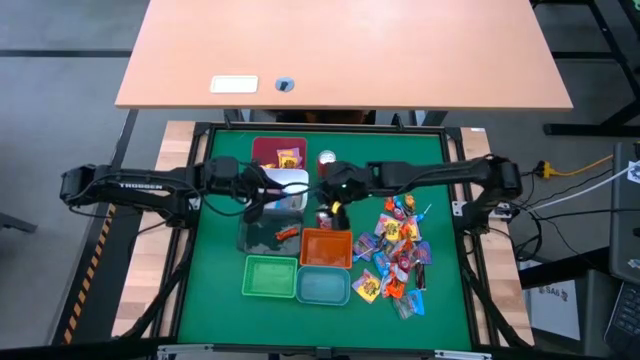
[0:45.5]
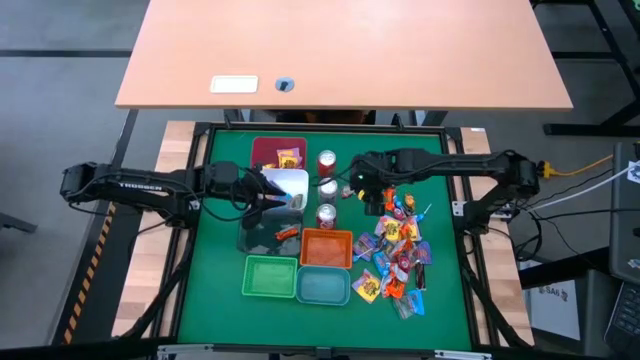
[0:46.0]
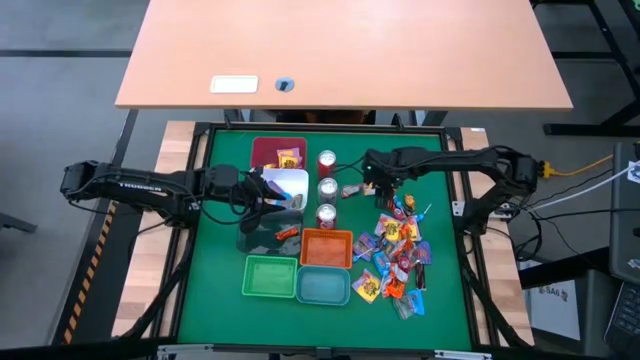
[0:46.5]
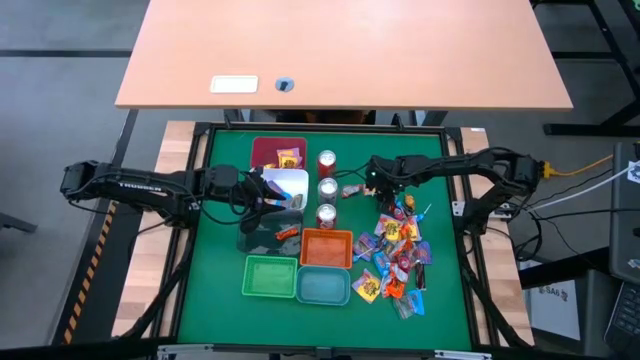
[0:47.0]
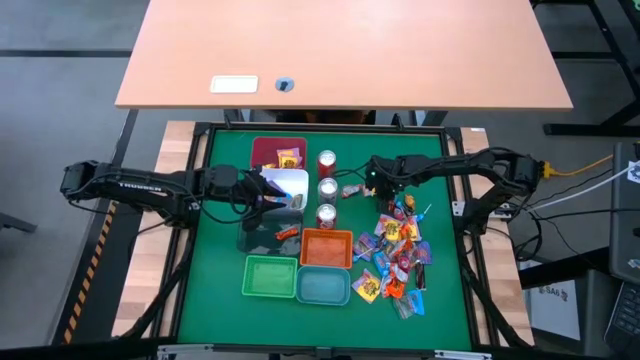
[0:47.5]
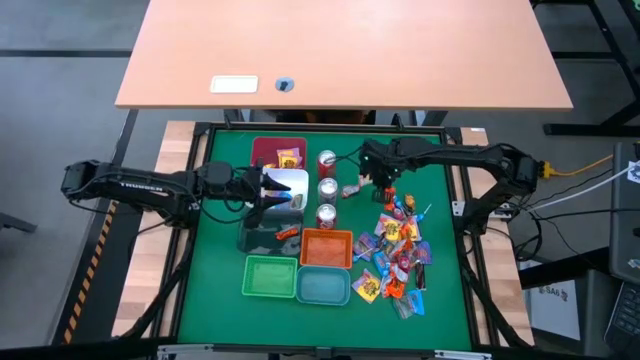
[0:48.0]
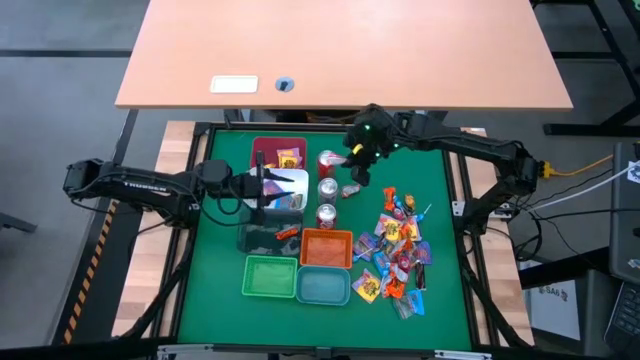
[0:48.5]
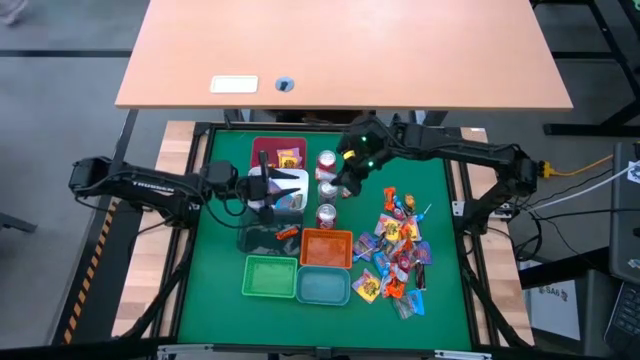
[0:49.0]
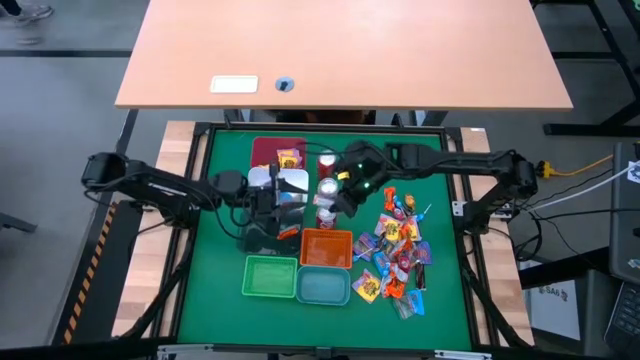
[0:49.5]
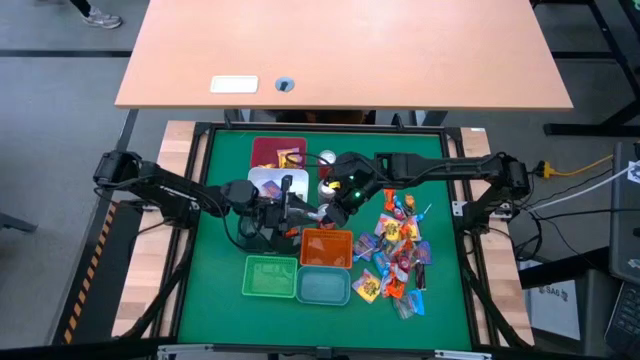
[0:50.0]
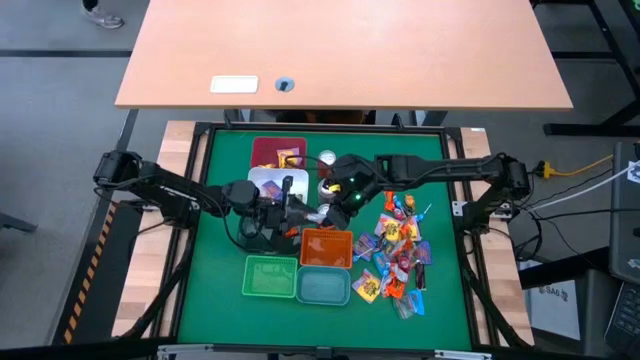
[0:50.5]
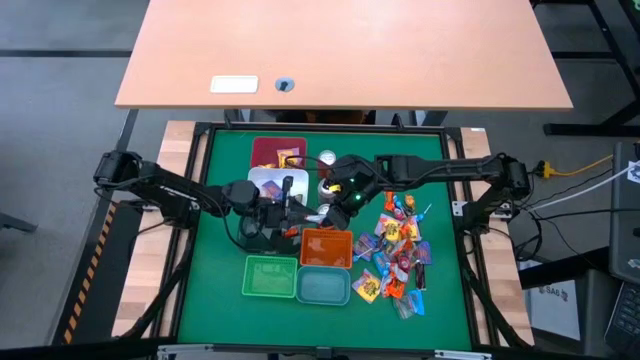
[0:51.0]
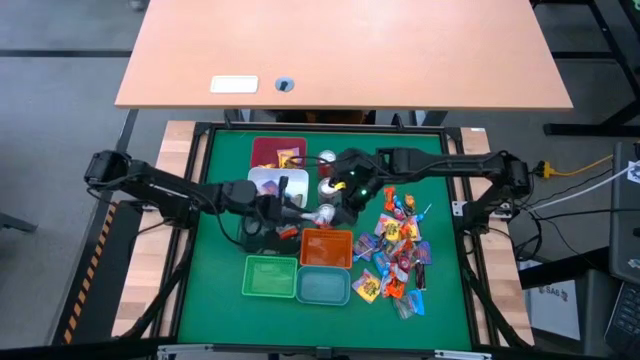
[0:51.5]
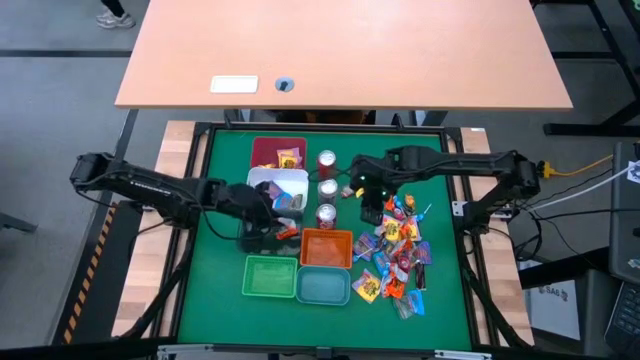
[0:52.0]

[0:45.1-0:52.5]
Task: Sort candy
Put the orange chocolate into the black bin

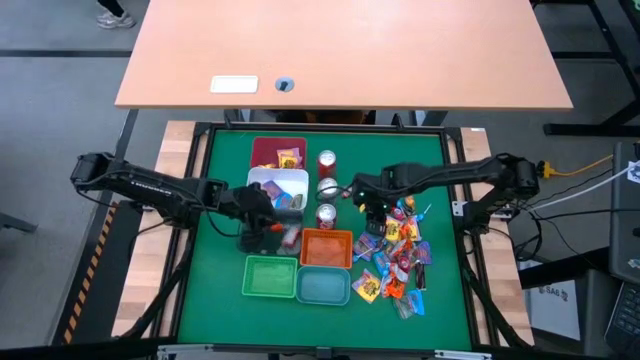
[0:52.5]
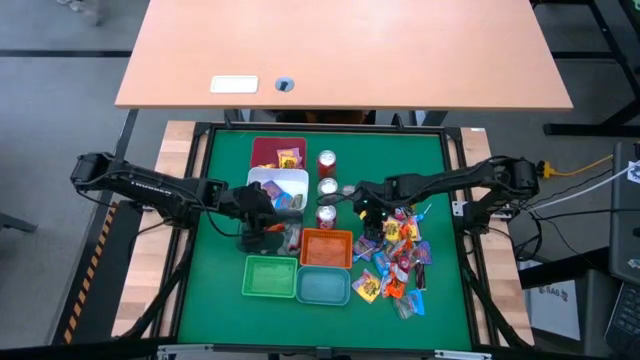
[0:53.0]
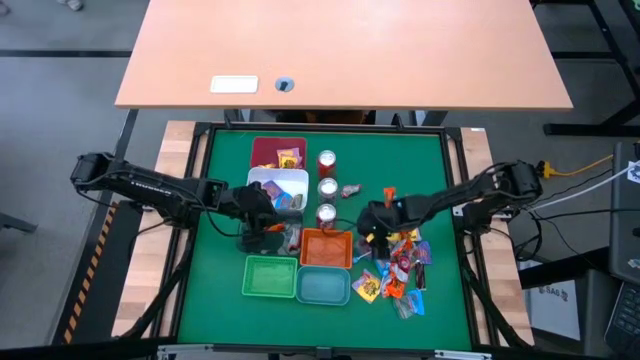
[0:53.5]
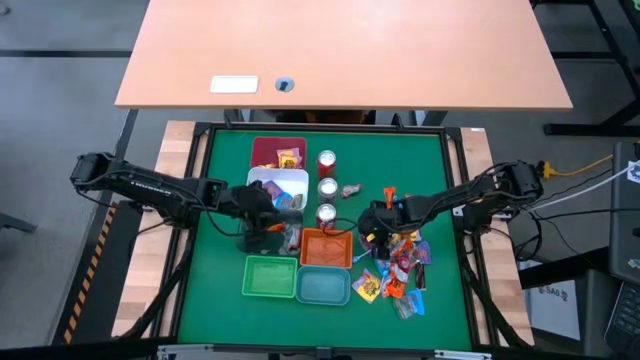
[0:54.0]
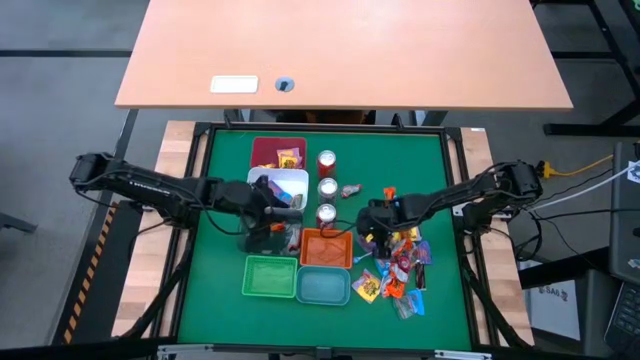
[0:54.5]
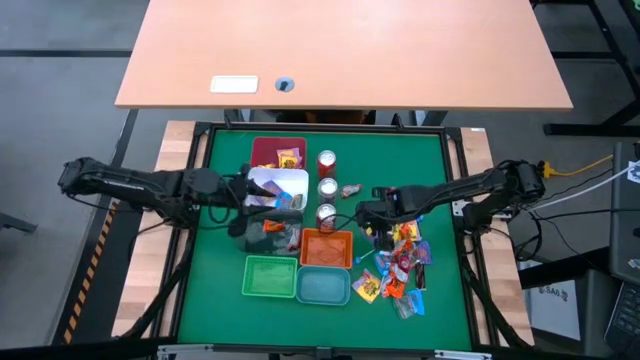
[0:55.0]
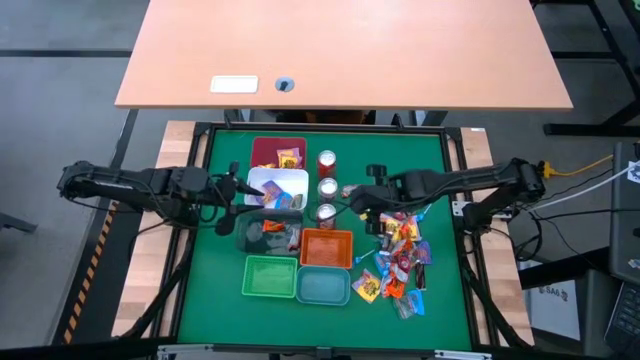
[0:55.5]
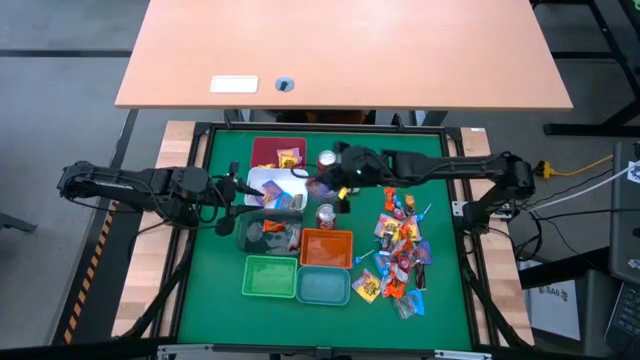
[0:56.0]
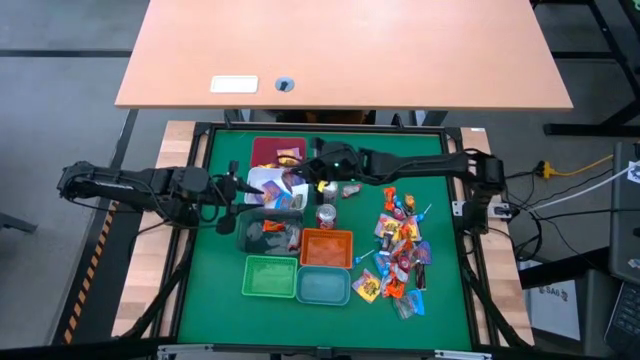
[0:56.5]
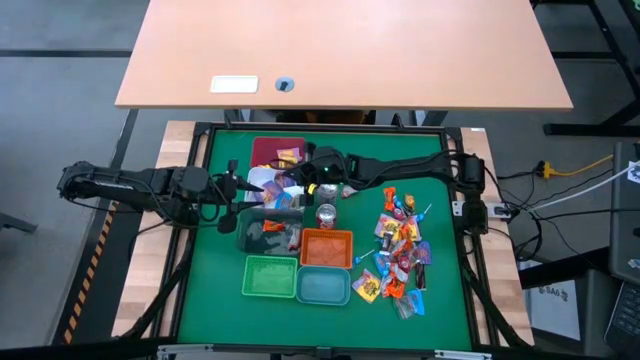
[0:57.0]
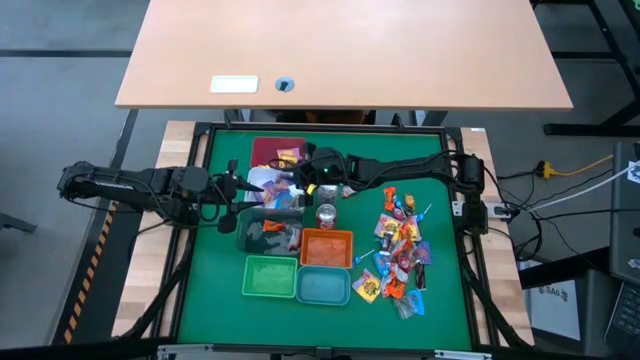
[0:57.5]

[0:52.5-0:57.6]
Put the violet candy into the white bin

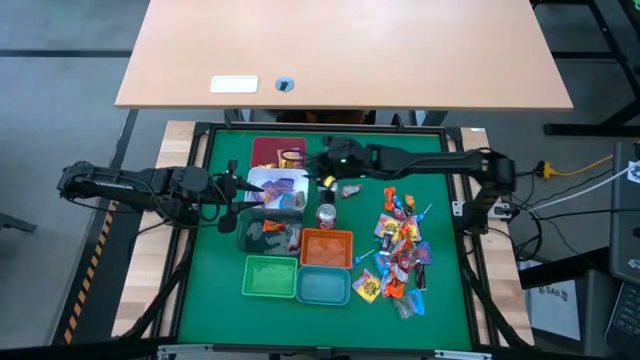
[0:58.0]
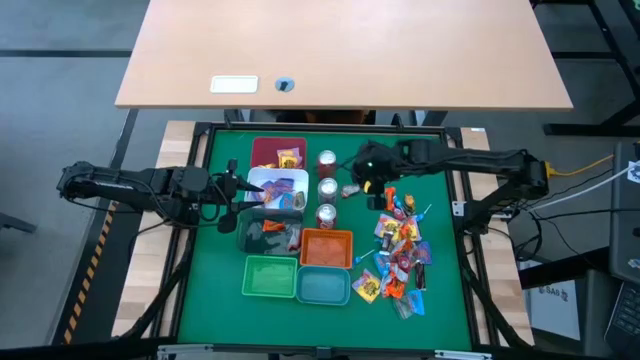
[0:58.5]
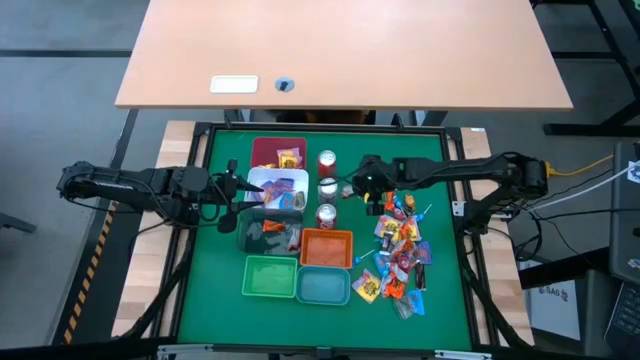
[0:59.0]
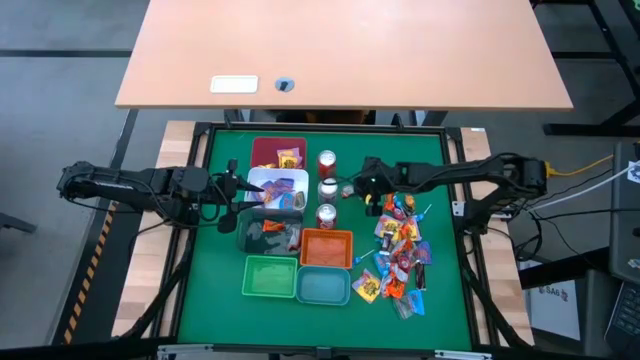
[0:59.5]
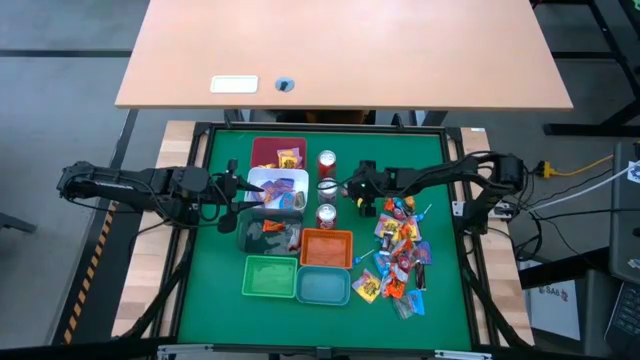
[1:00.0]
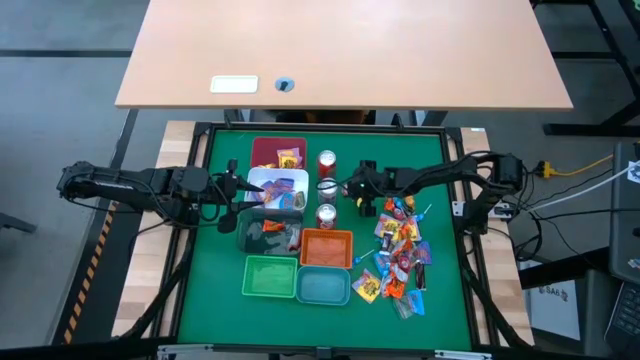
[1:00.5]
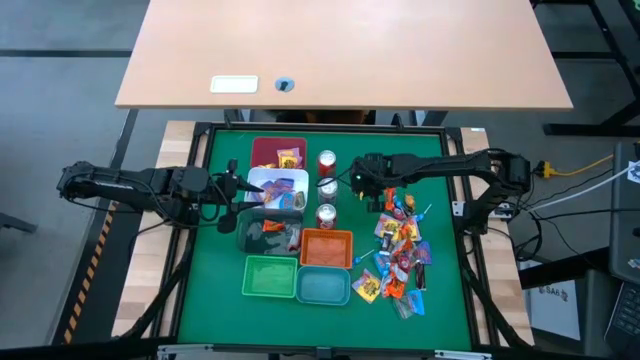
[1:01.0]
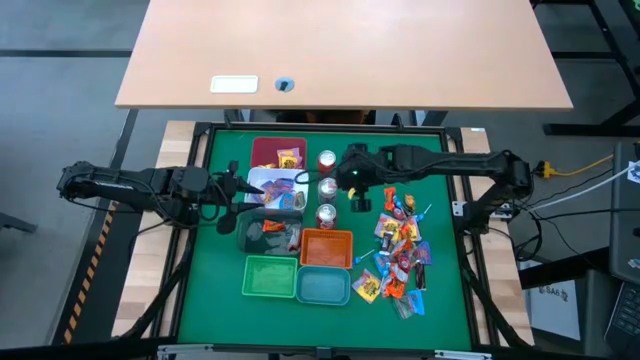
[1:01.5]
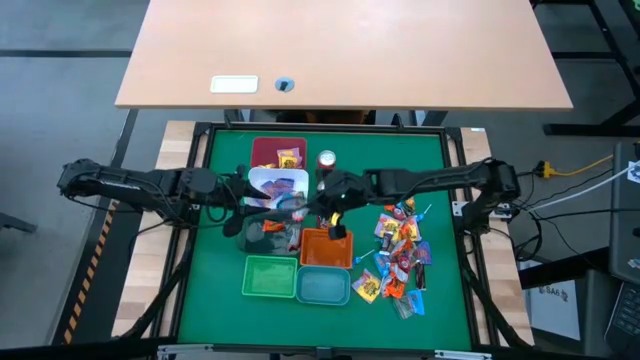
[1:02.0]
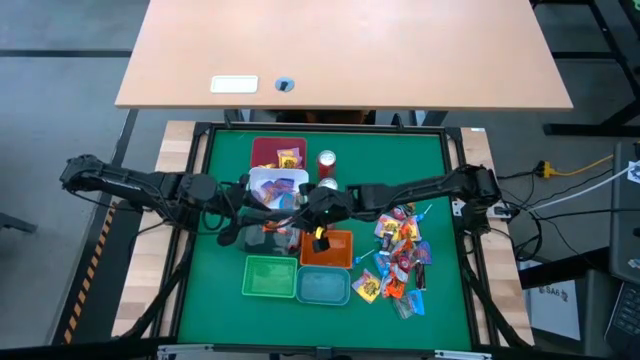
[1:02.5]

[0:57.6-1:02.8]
Put the orange chocolate into the black bin

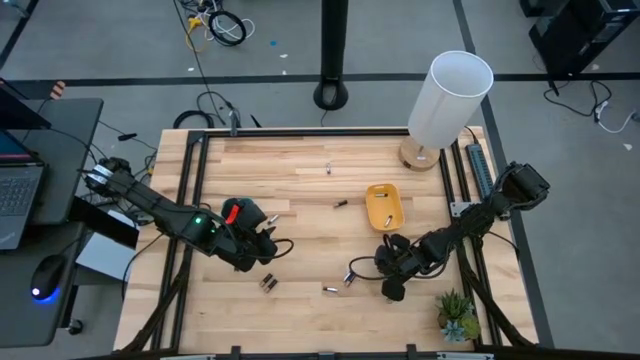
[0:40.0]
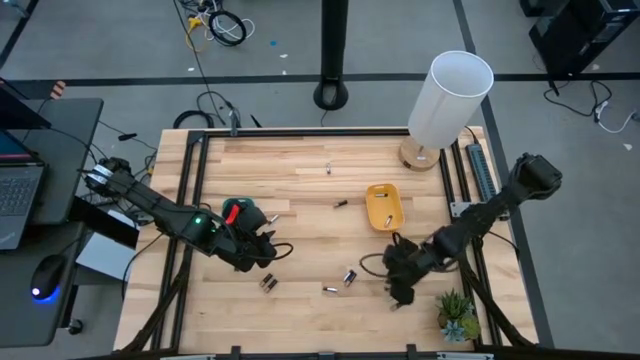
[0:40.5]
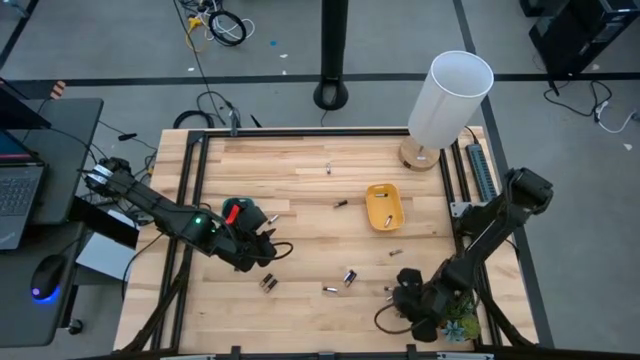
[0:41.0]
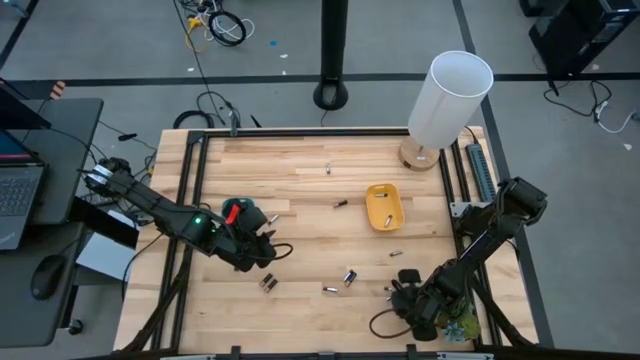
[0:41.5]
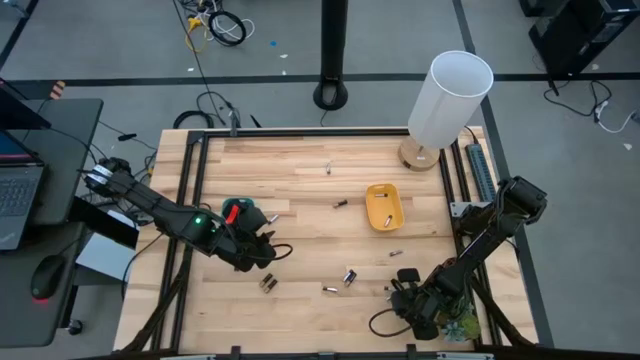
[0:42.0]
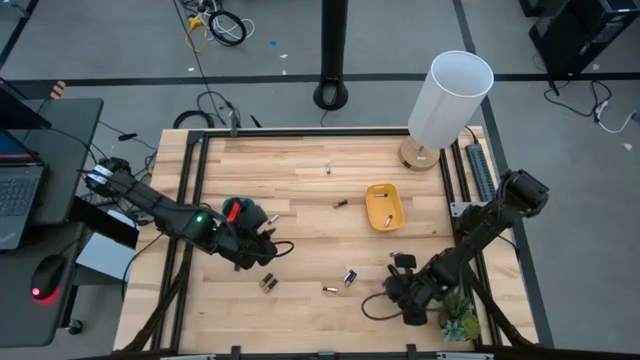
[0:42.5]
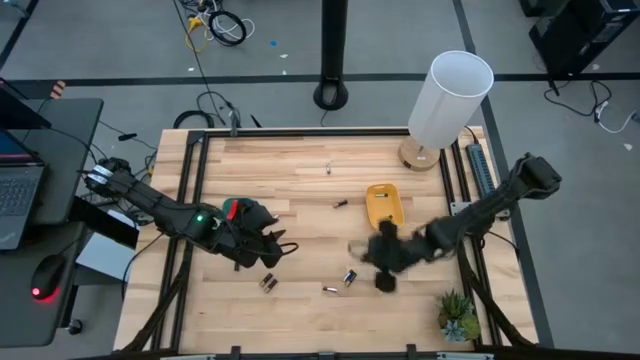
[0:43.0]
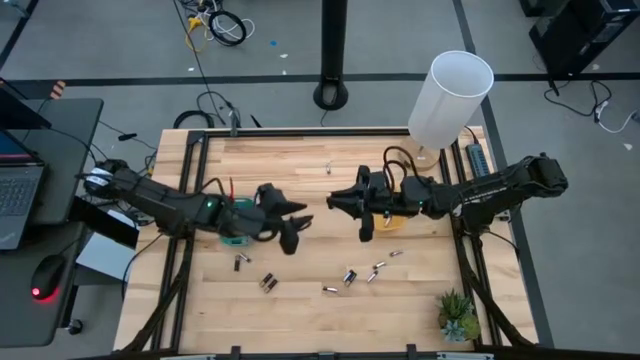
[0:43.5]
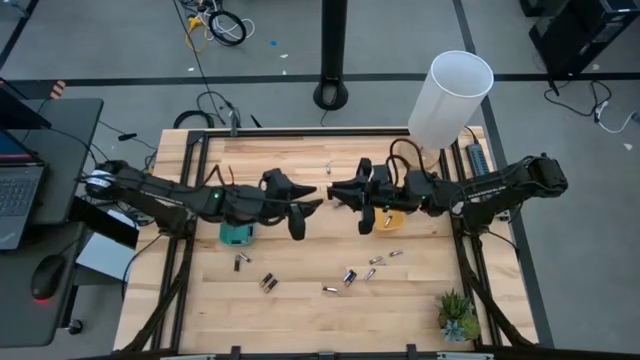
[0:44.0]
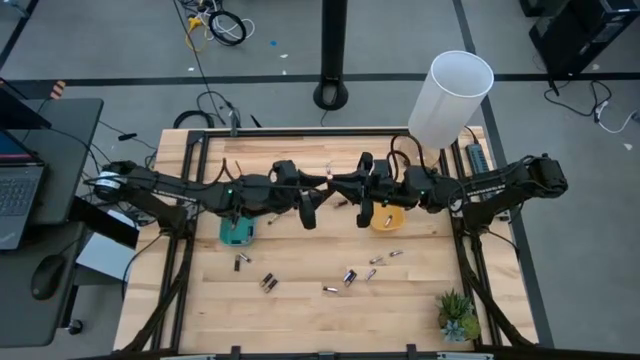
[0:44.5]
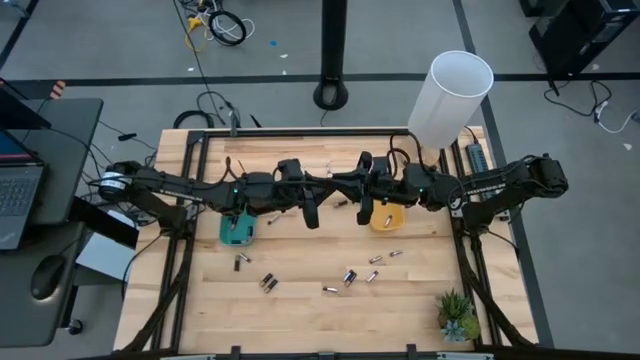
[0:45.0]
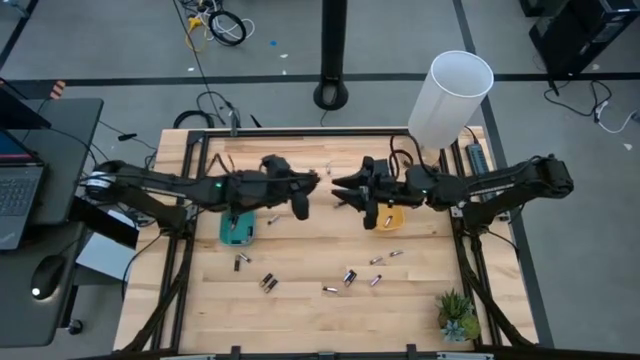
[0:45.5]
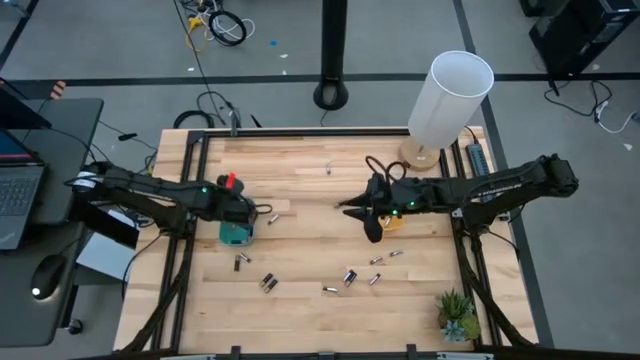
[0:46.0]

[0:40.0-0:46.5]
Task: Sort batteries
Put the black battery into the green bin
